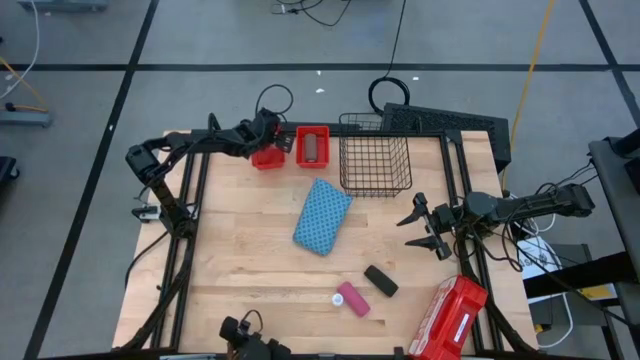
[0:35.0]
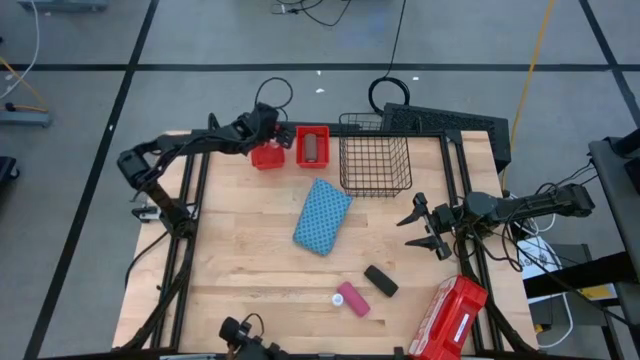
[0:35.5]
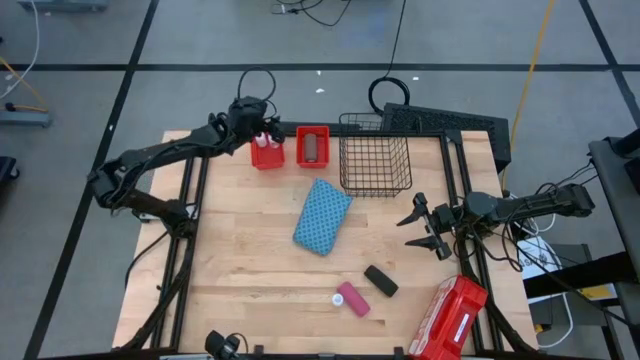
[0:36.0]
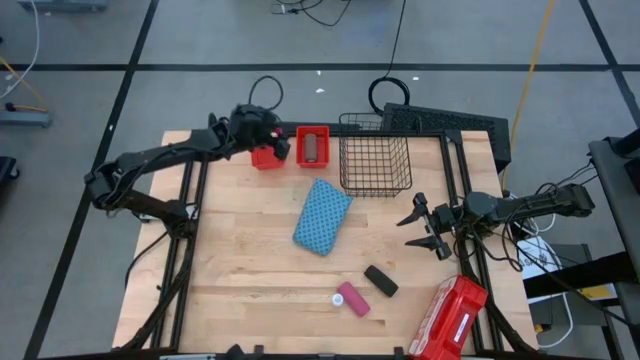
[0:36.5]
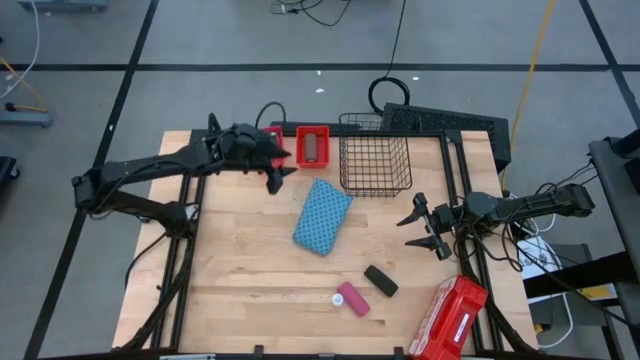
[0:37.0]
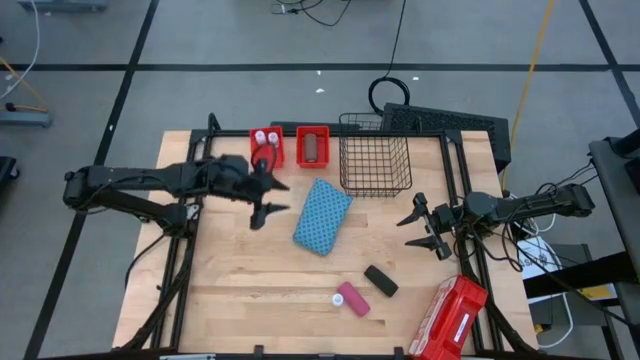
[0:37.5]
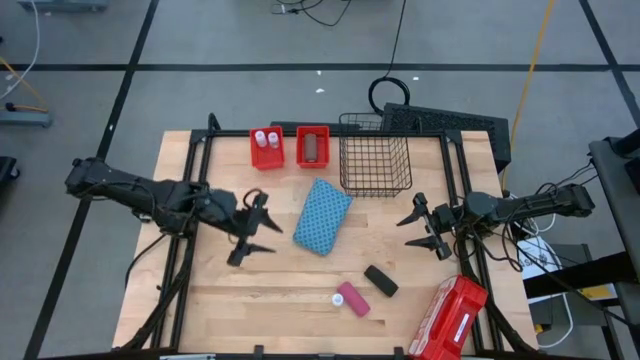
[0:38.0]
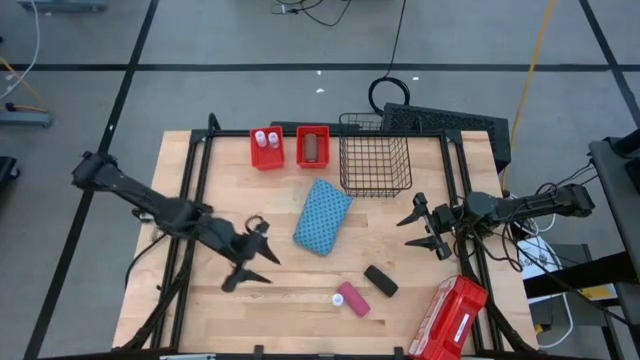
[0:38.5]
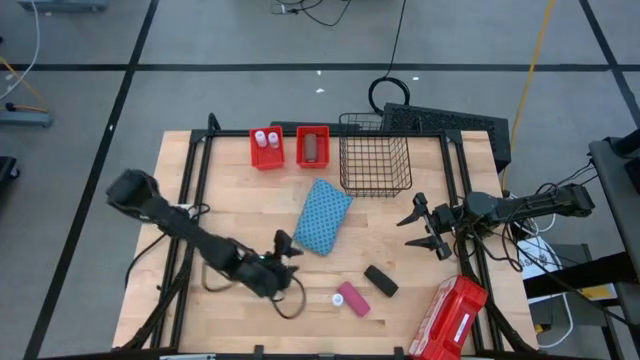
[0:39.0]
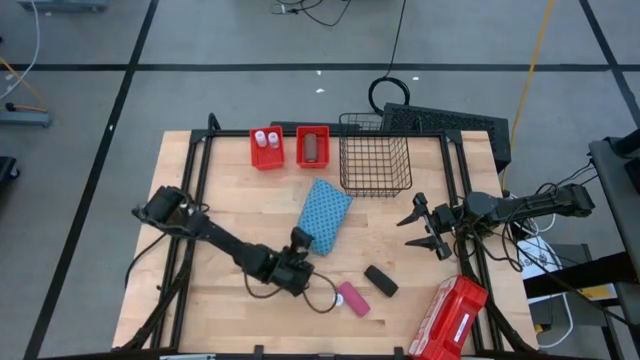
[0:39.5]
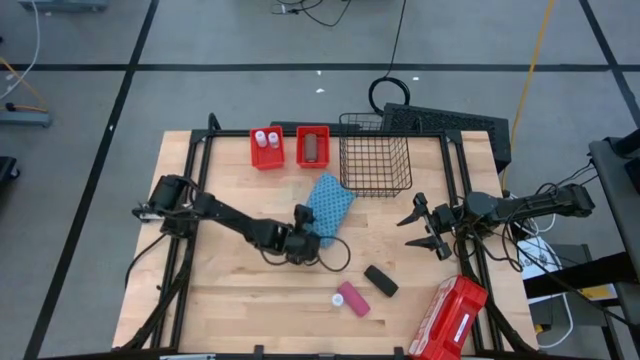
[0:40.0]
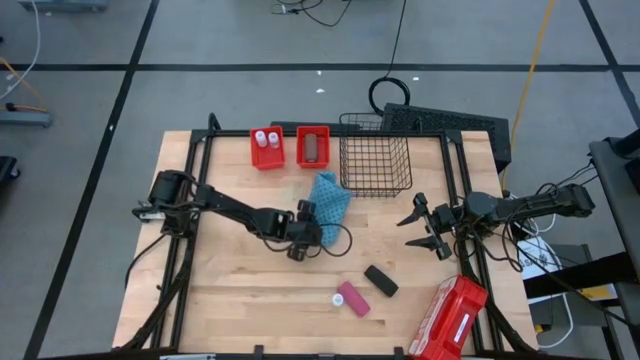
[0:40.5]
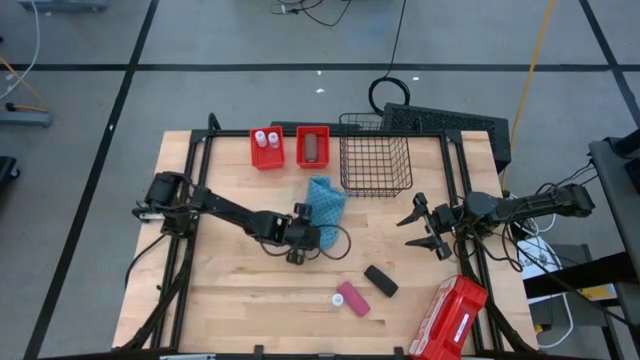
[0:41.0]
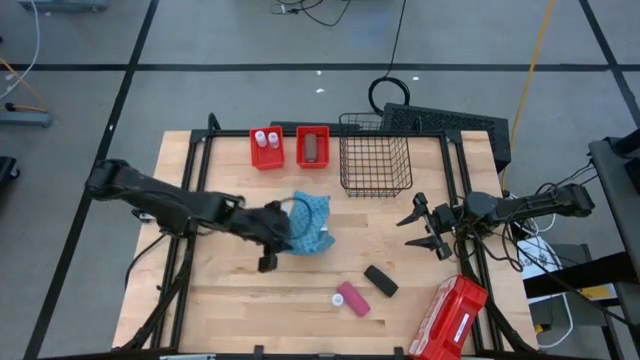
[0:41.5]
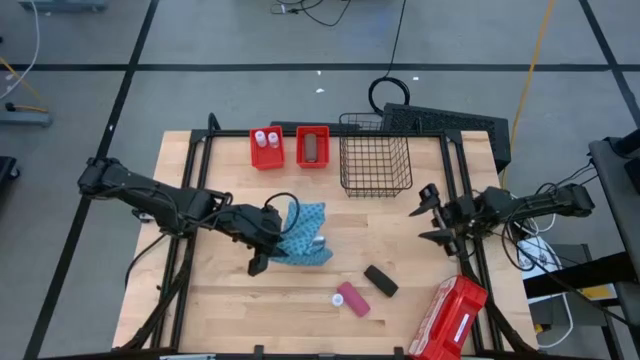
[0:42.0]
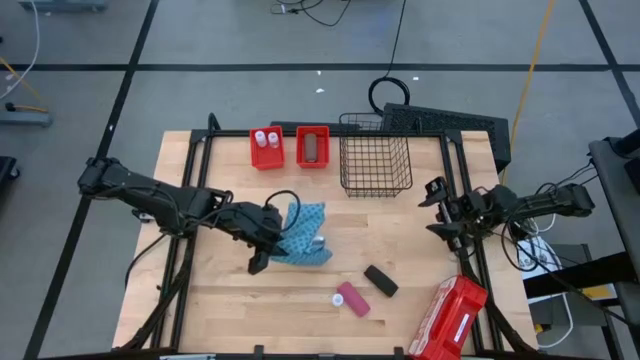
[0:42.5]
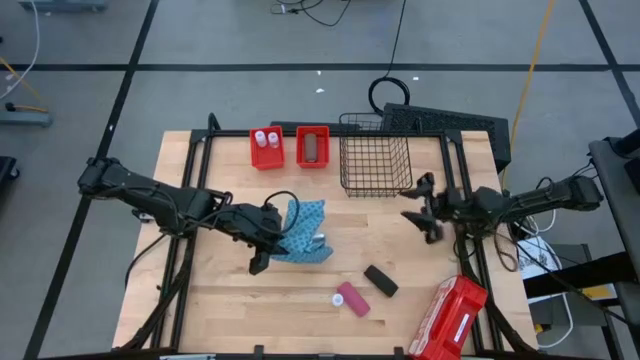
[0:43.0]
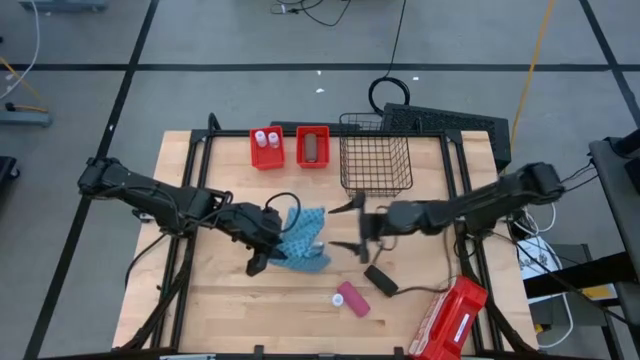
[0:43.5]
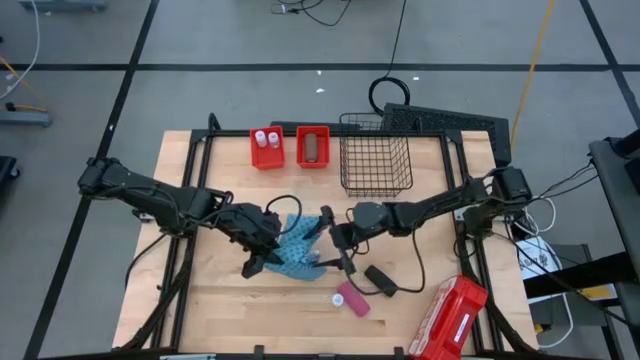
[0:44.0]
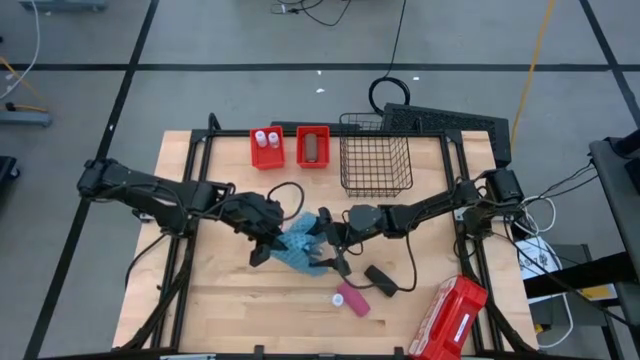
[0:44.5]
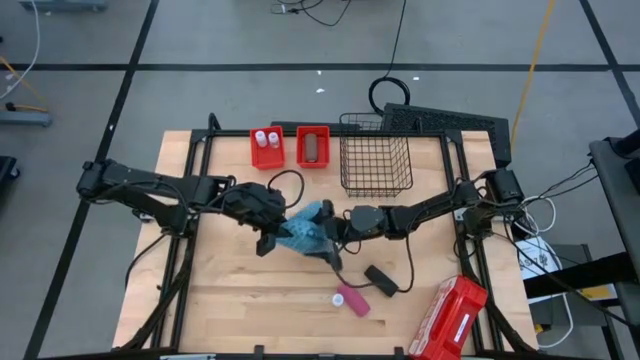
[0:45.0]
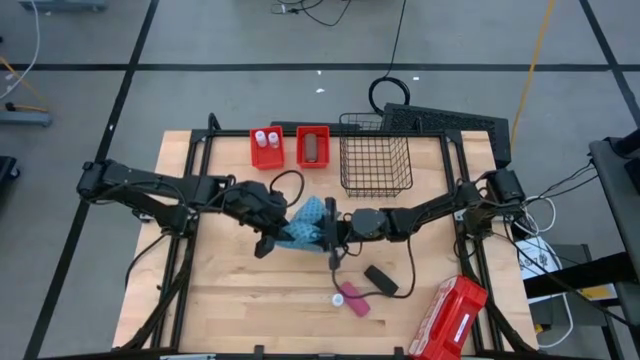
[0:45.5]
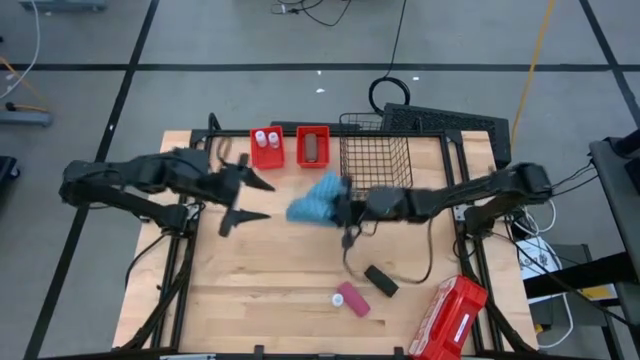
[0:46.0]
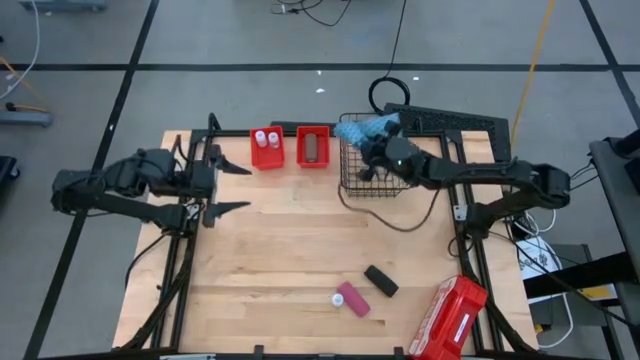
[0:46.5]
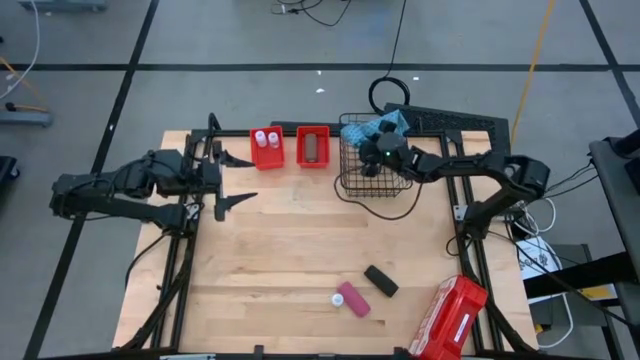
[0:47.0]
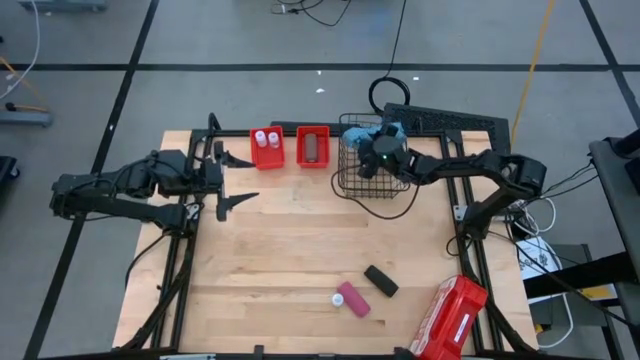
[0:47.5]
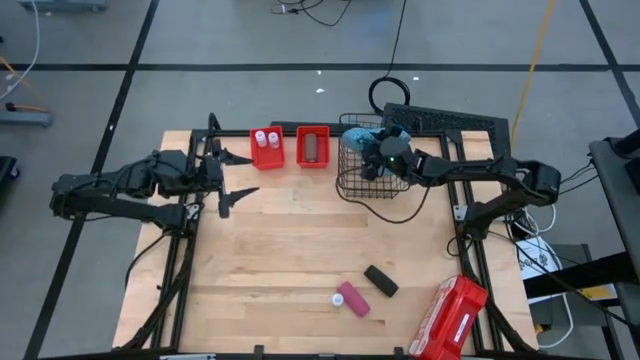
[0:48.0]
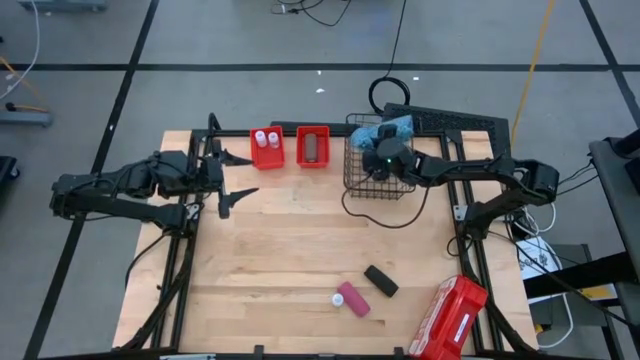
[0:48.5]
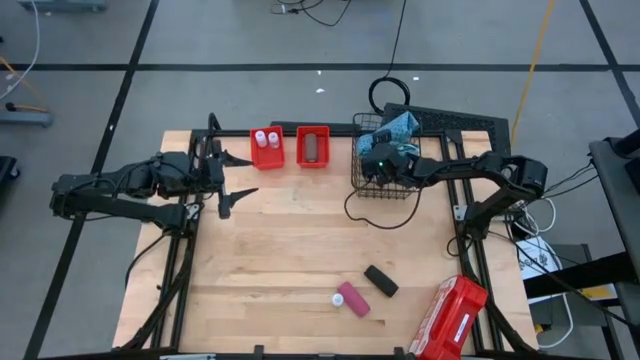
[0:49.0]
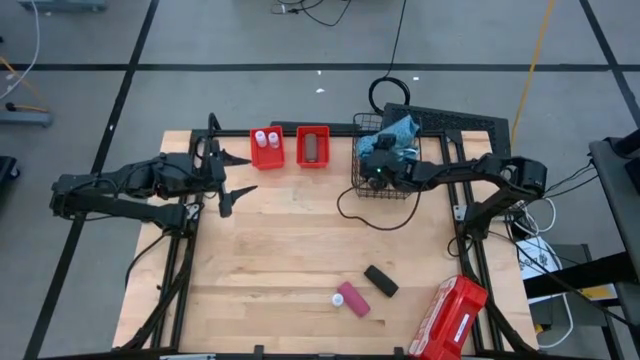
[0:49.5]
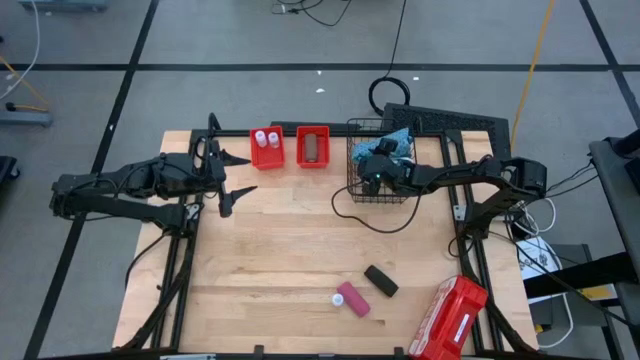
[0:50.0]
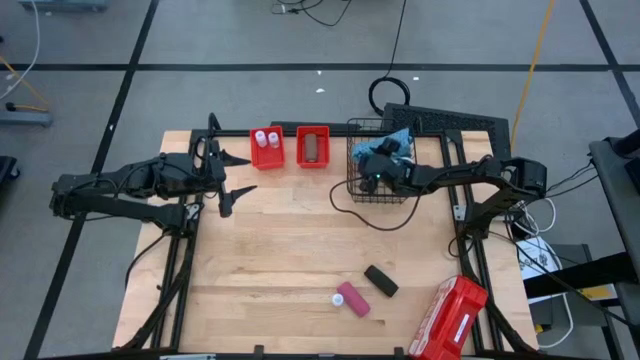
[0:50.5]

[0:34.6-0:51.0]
Task: Pick & Place Medicine items
Put the blue patient gown into the black wire basket
